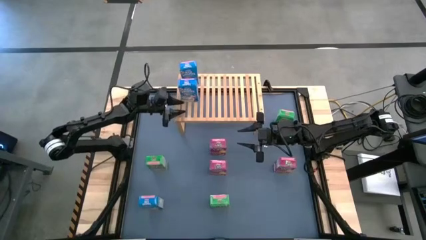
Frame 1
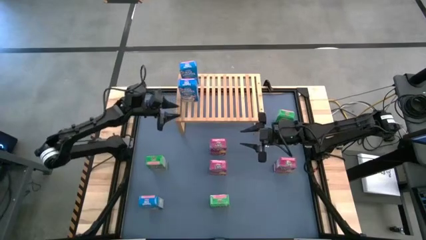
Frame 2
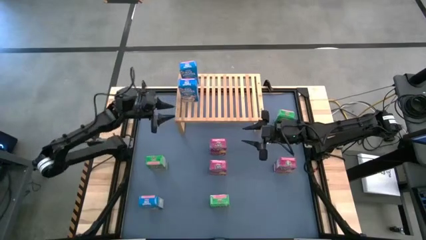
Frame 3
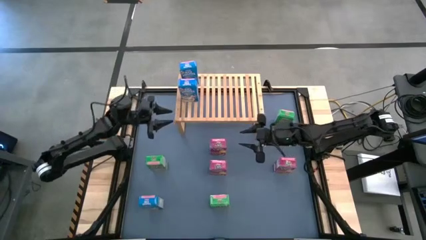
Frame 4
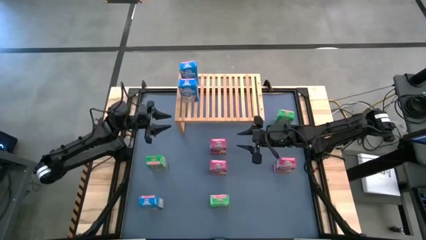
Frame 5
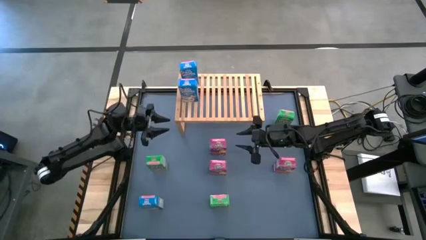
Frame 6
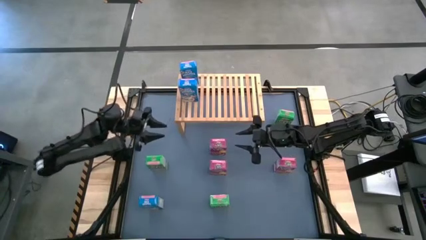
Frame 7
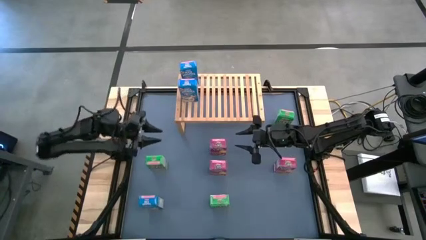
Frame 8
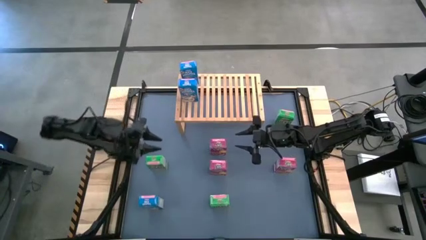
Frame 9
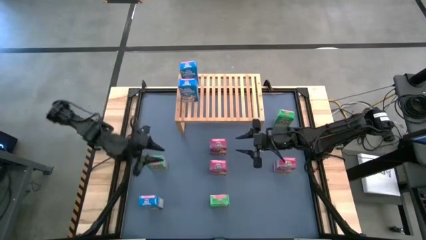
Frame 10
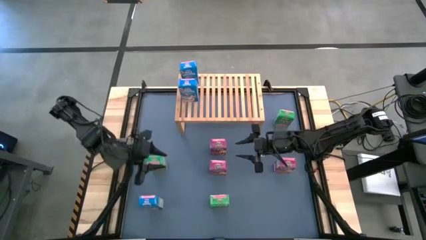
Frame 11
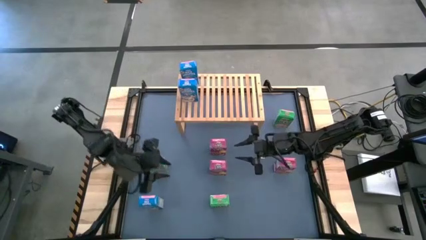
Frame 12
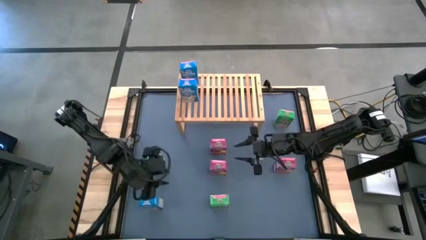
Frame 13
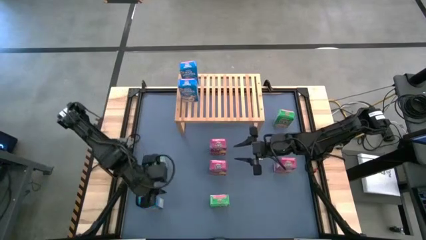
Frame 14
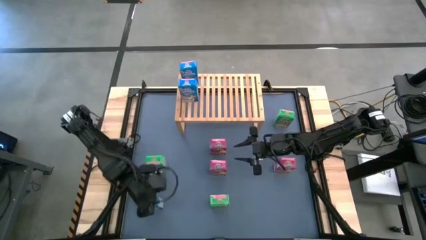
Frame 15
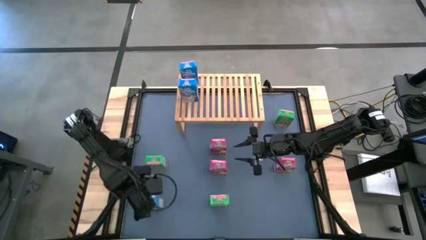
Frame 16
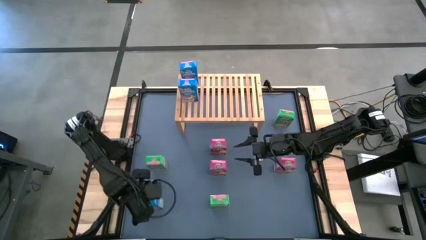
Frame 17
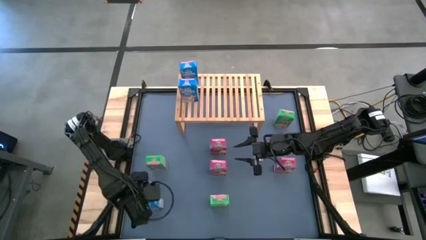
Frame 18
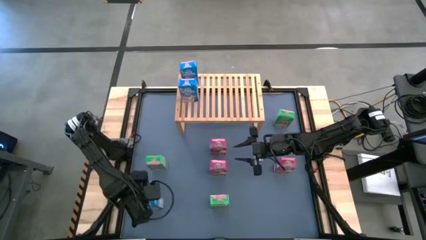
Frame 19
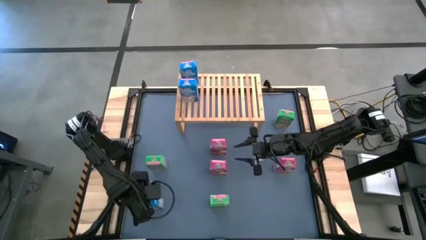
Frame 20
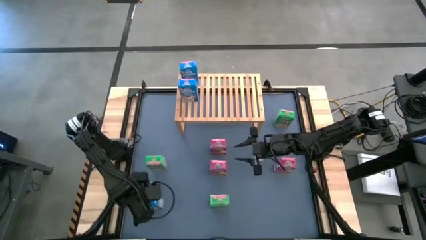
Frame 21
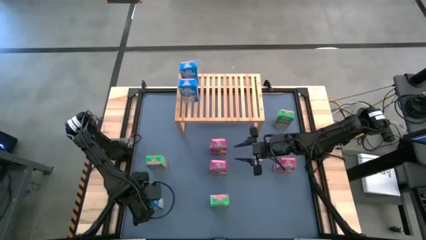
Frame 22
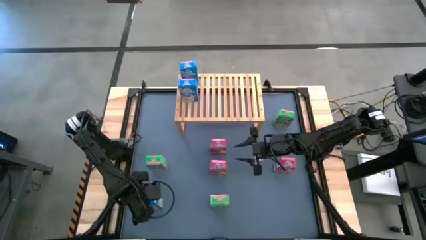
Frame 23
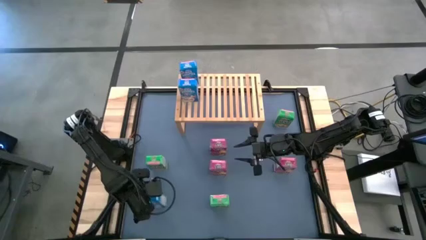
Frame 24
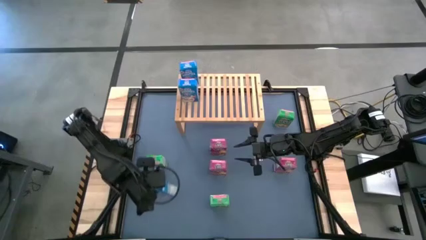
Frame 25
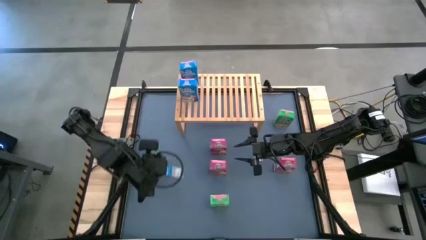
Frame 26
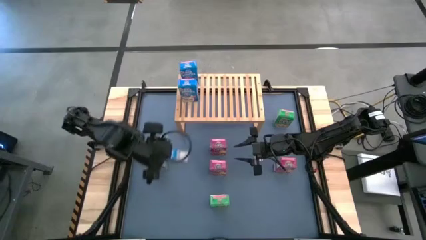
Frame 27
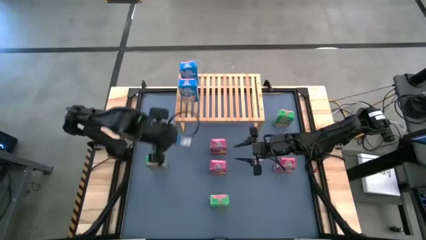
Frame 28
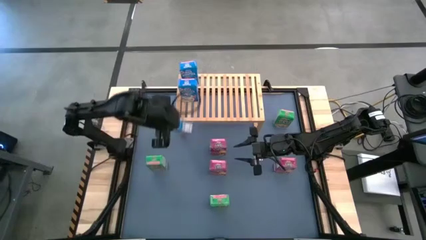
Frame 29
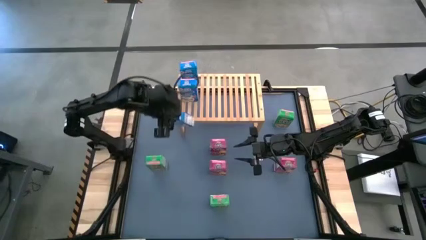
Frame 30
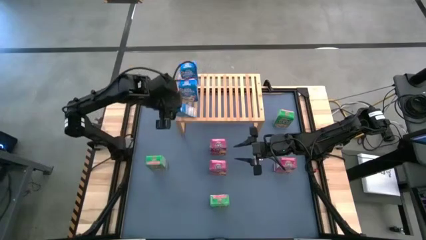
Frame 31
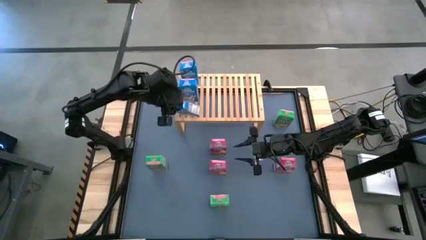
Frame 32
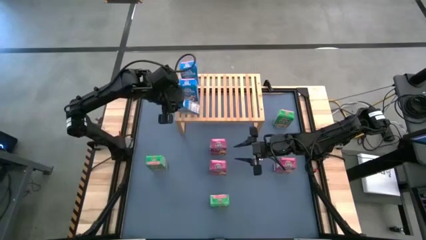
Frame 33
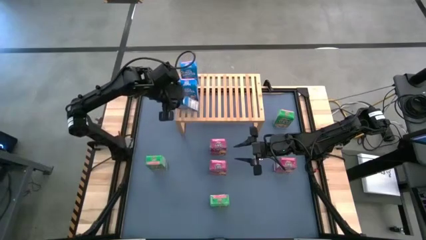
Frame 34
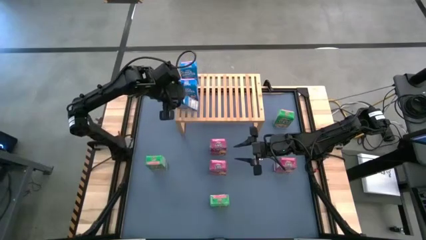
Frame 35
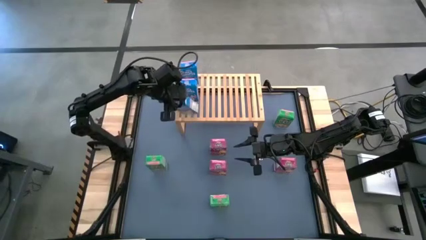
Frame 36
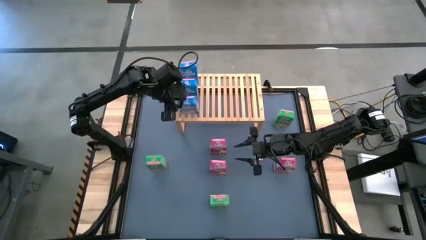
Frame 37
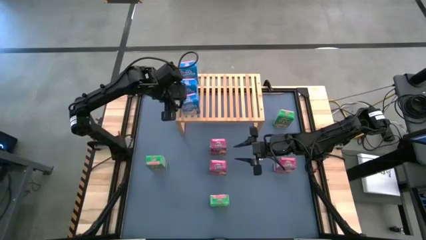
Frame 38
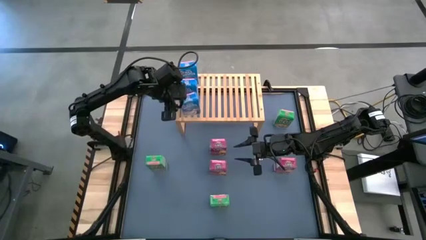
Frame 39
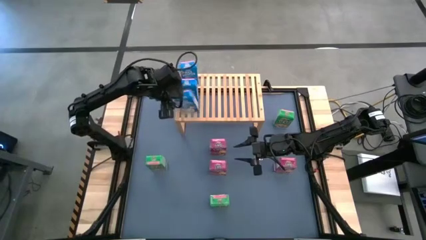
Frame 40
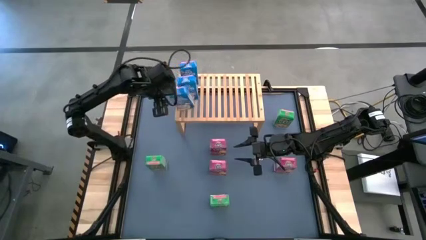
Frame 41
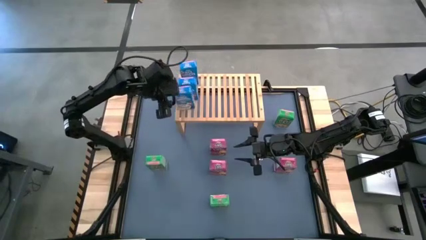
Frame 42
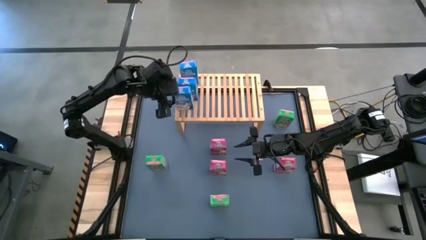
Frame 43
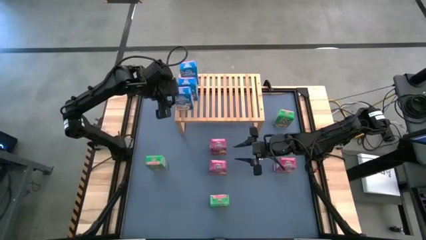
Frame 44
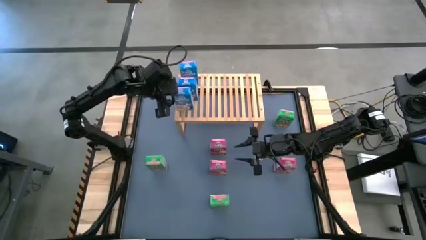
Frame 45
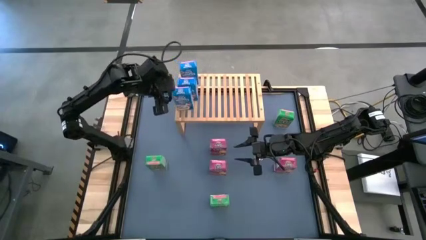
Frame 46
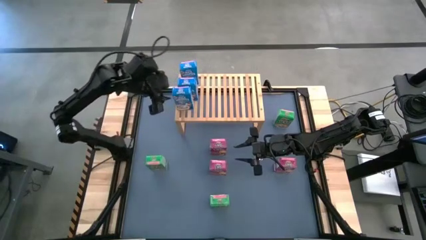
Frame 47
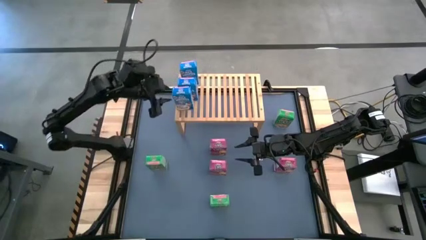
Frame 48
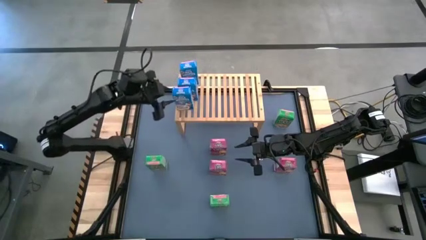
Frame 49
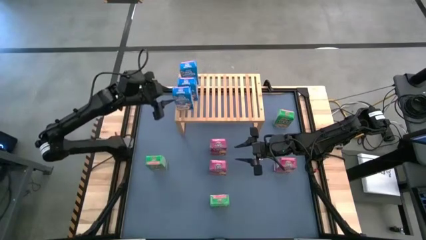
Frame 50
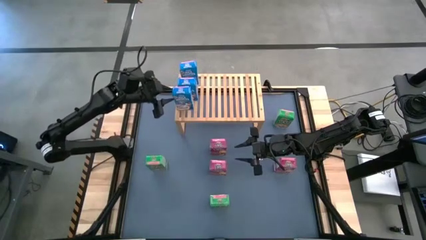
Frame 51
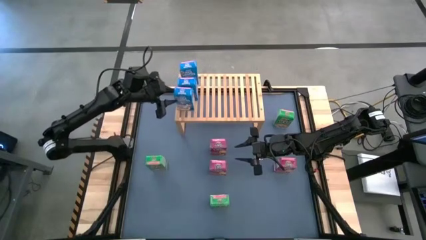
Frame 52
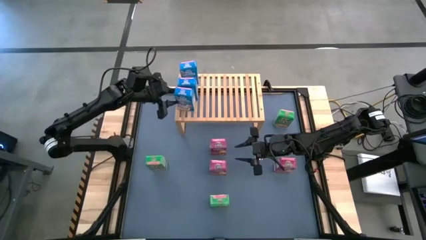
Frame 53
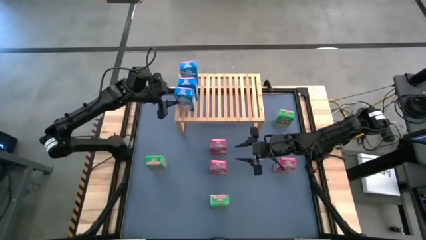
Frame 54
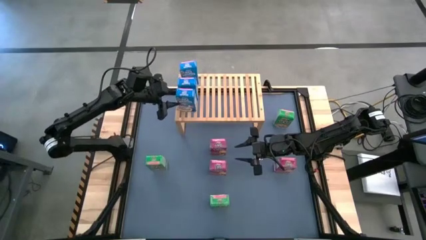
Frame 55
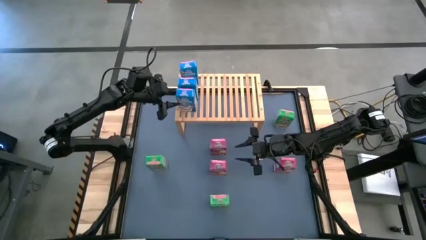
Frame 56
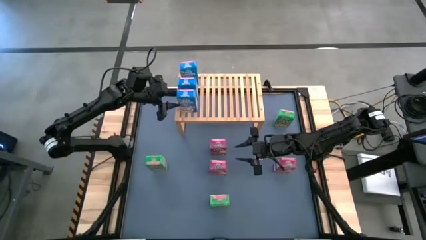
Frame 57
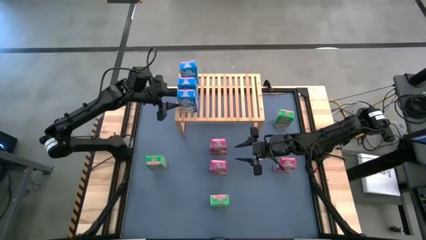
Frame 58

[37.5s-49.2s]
Task: Stack cereal on shelf
Put the blue cereal box on the shelf aligned with the other blue cereal boxes

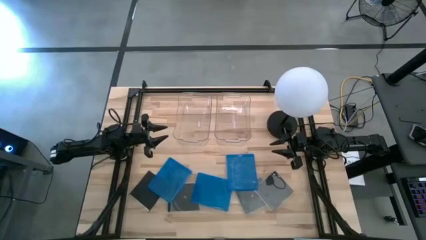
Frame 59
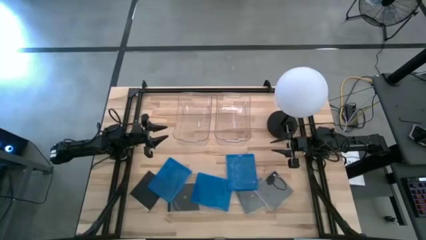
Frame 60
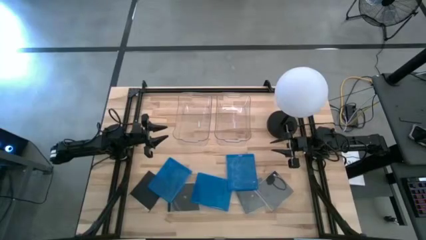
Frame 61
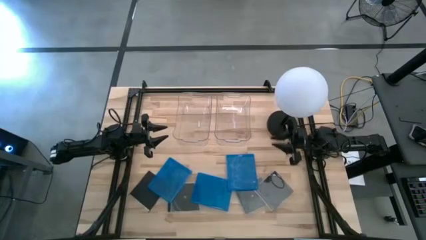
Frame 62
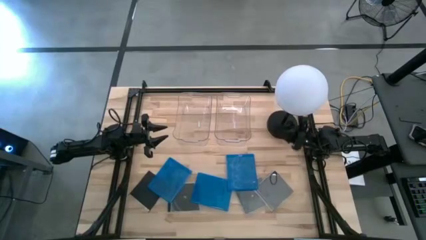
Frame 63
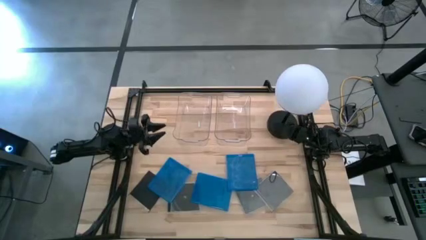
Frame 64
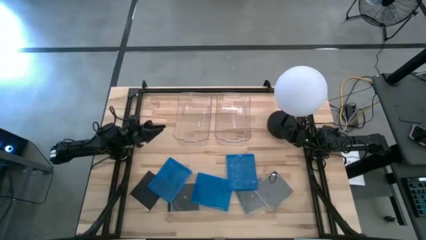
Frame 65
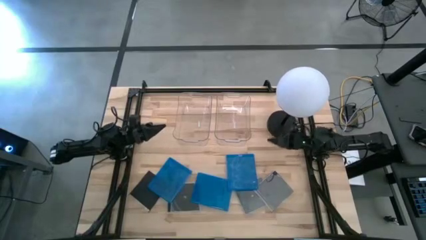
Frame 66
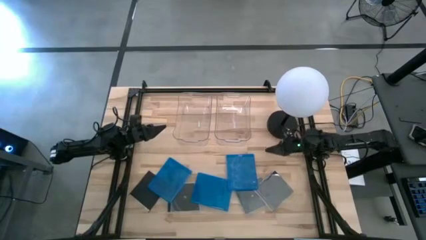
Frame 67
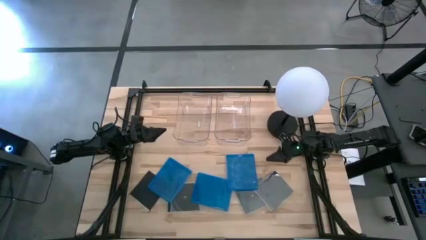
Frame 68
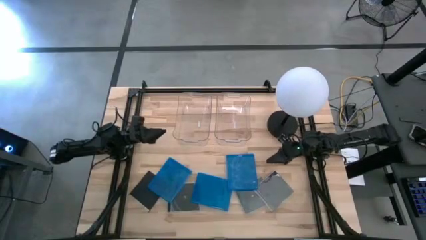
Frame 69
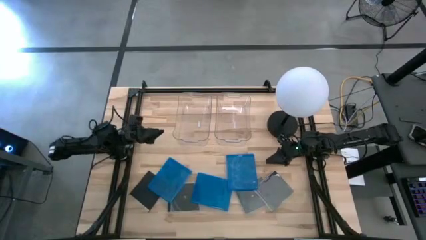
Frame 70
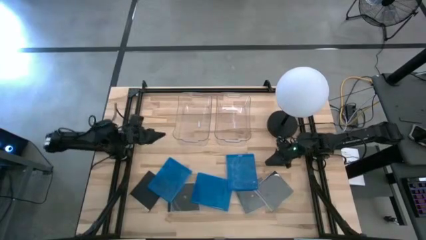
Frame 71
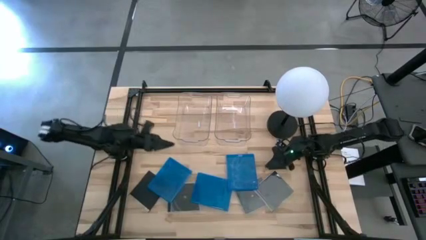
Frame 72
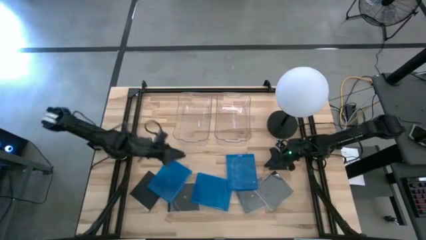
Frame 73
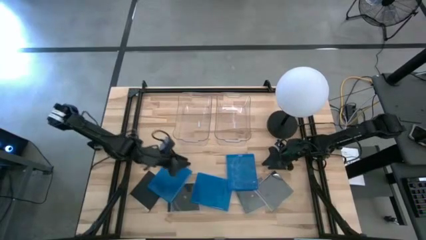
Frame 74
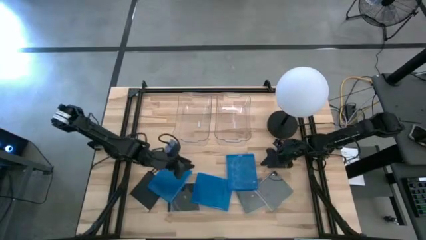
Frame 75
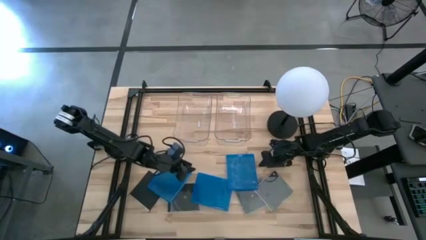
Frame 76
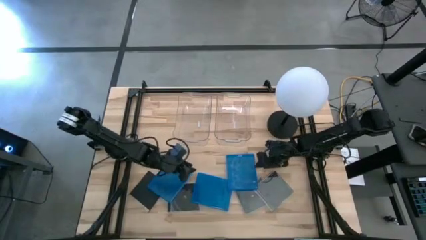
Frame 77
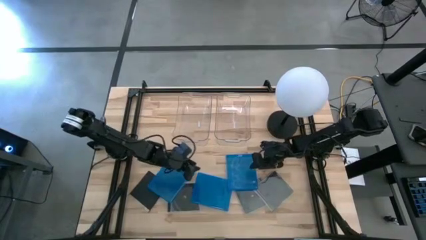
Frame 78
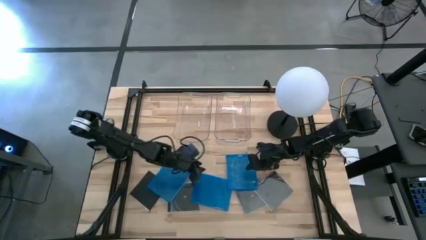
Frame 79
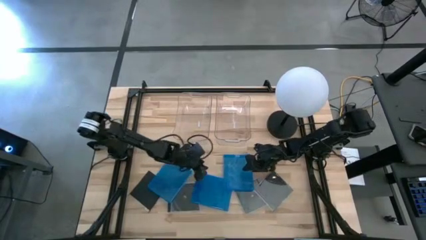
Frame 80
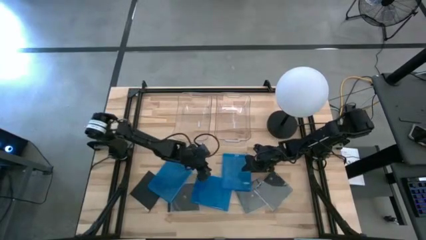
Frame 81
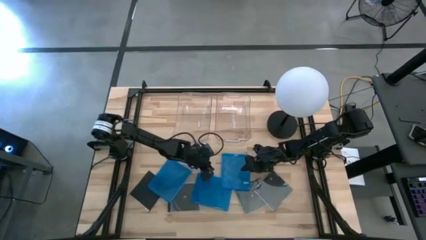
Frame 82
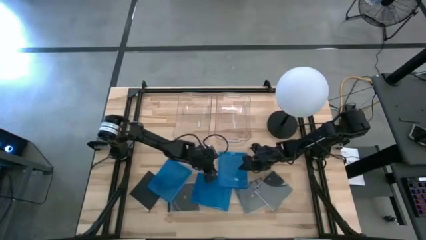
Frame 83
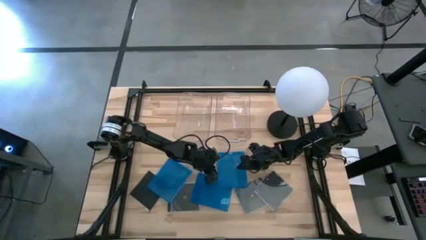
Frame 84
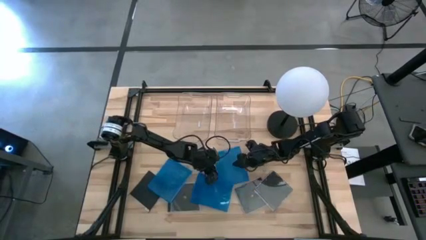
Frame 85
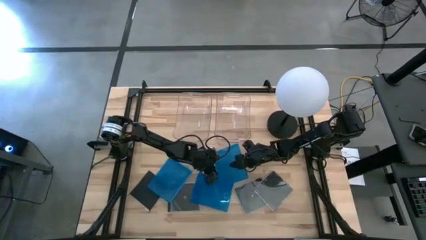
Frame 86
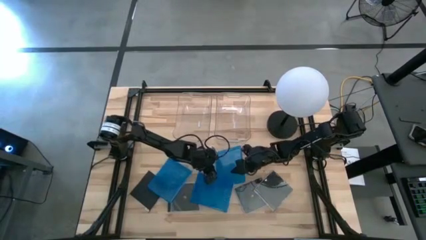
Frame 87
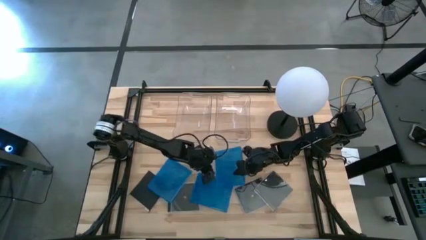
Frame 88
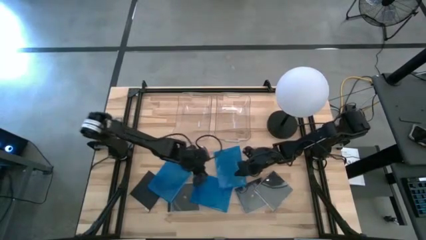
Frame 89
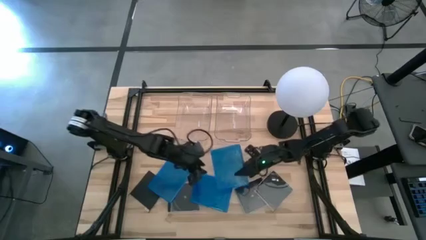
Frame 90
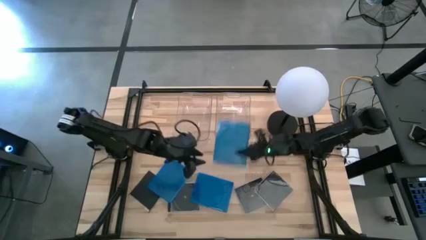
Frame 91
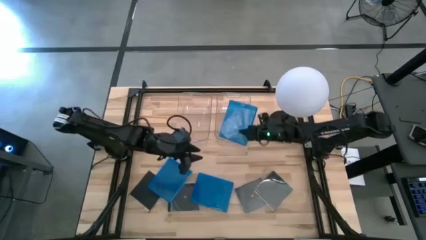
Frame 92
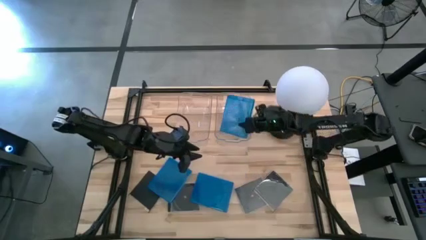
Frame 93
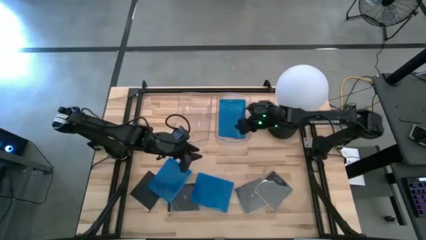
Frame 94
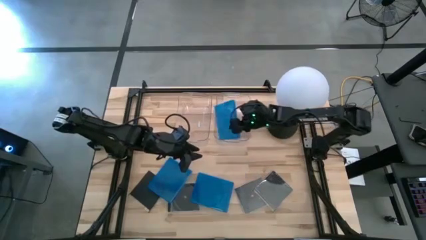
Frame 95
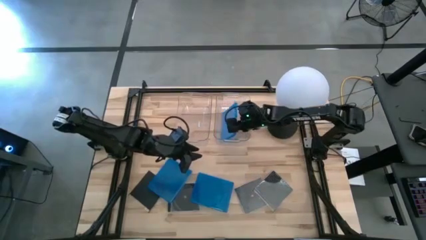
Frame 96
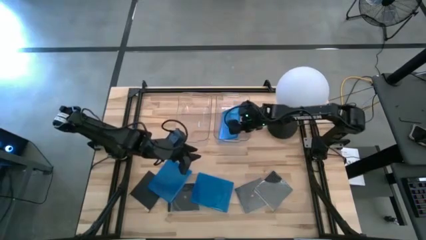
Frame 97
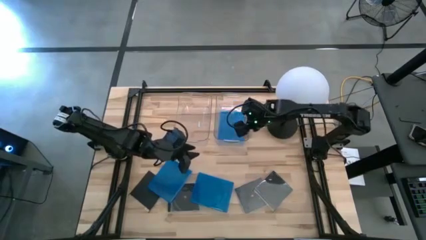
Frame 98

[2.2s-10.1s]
Task: Pick & place jewel cases by type
Put the right blue cd case into the right transparent bin
